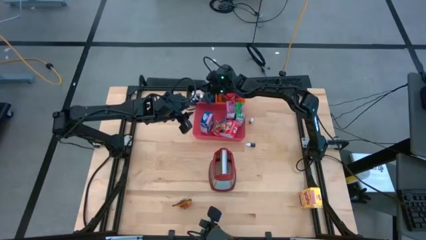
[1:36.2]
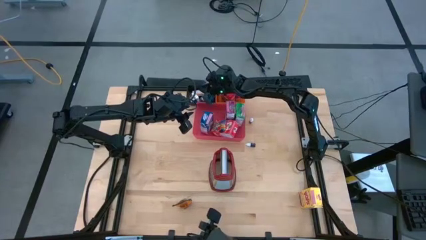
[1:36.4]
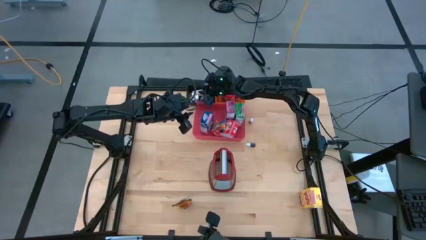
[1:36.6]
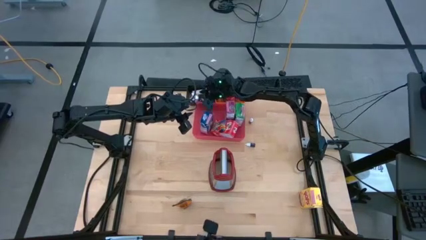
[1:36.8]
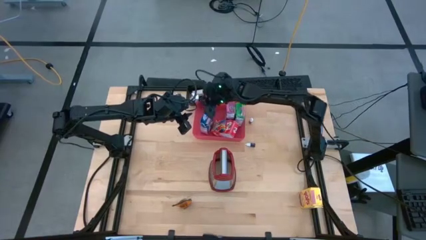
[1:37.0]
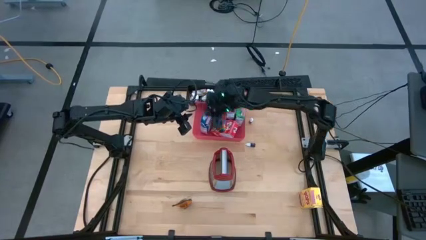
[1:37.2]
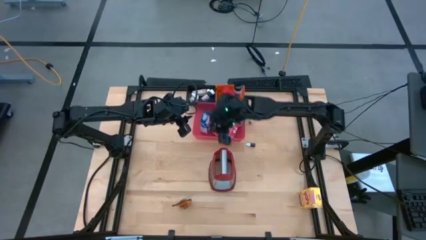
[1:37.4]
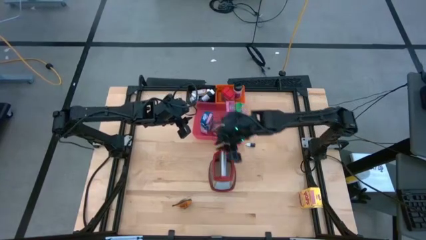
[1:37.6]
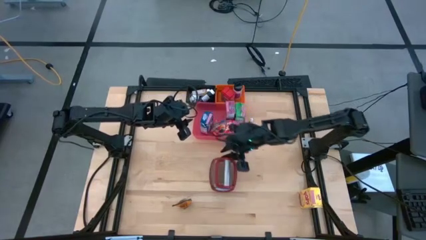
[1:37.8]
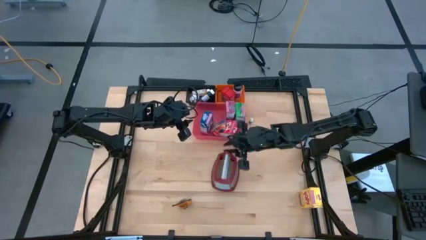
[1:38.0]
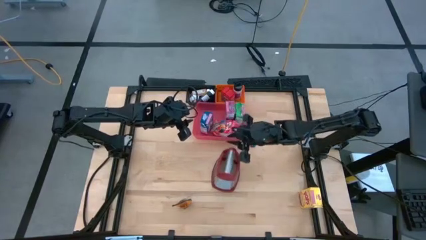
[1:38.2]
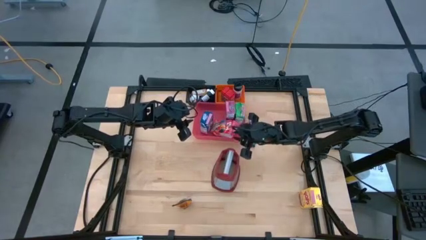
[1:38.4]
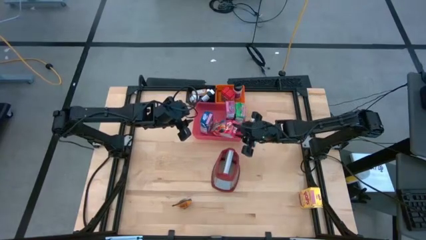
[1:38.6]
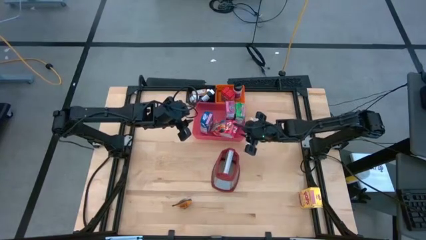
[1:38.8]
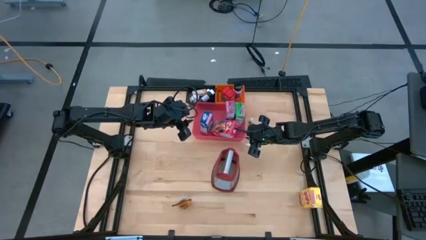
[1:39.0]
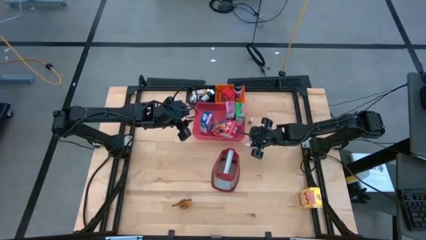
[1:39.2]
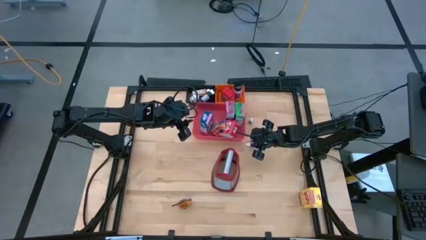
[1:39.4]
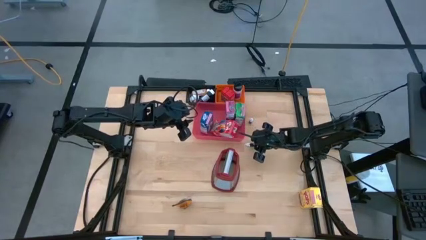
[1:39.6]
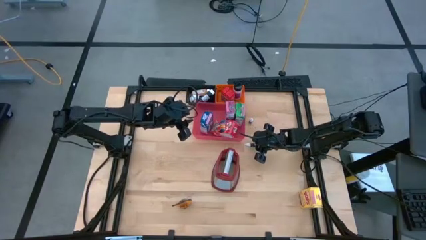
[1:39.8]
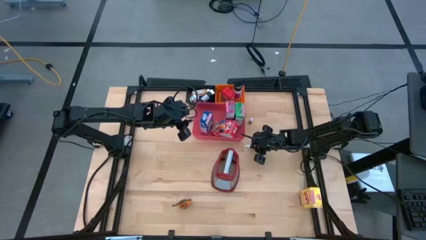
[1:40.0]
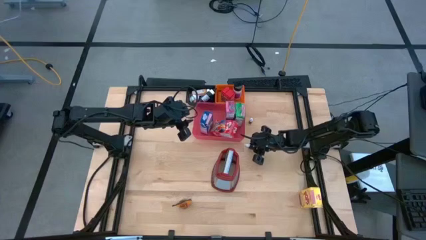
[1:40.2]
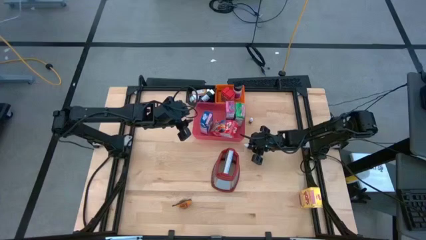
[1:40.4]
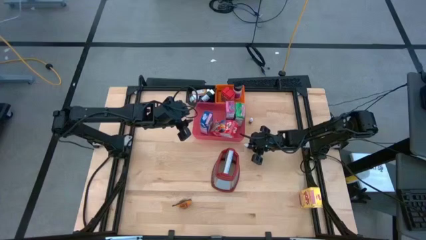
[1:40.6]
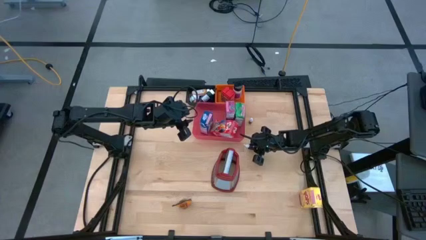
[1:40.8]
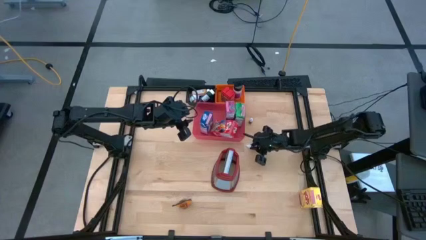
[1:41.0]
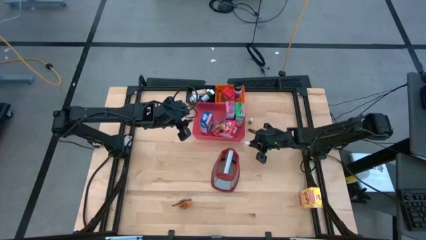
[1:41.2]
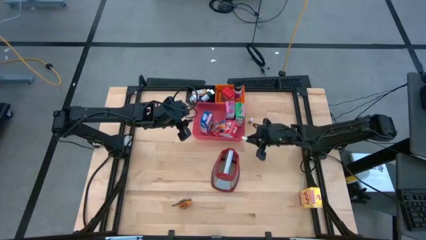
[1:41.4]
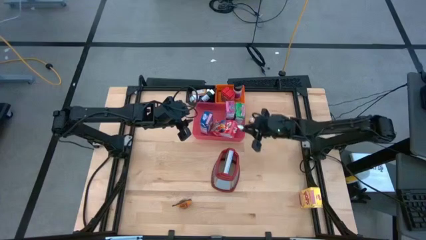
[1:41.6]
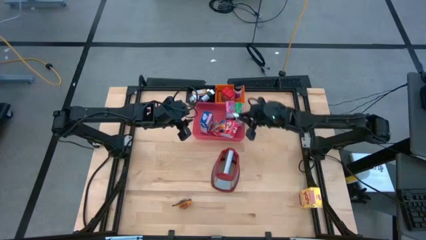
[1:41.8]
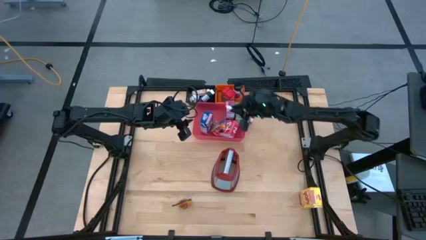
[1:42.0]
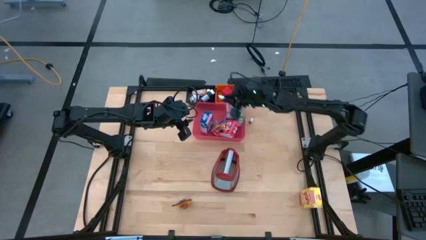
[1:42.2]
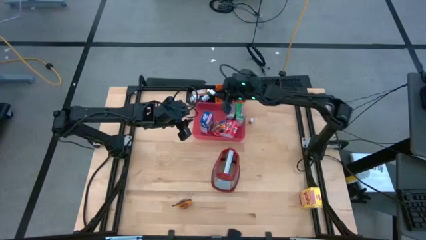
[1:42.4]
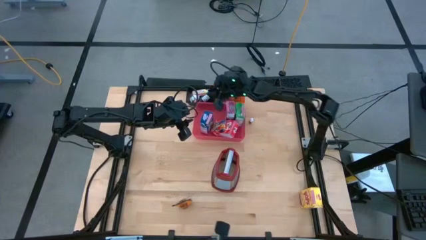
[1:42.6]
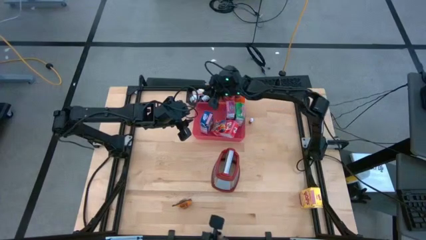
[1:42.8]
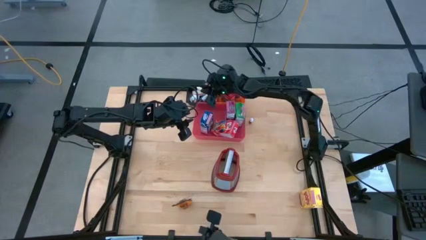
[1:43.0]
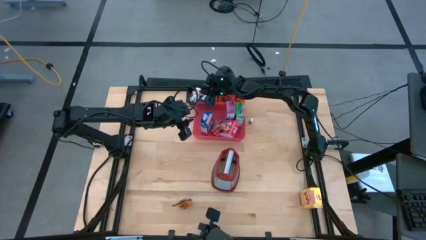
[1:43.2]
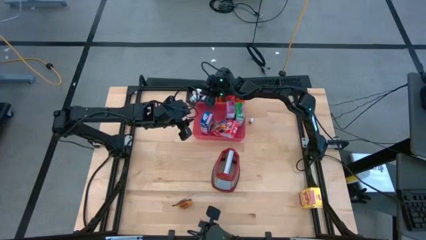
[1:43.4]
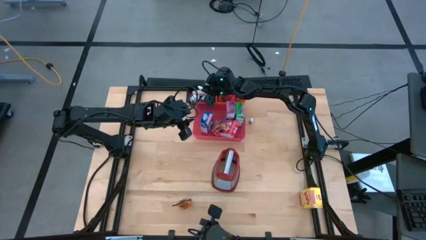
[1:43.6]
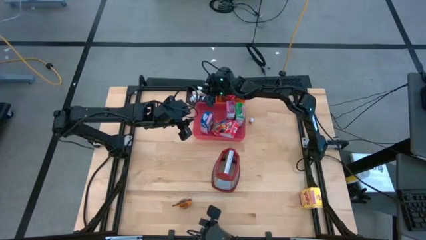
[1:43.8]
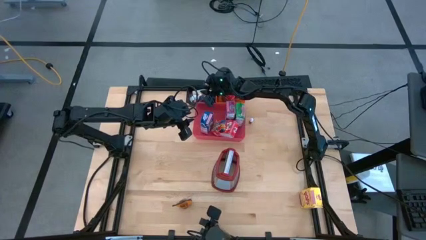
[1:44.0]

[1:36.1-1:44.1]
Task: Pick & Place Kitchen Items
Put the small purple food coloring bottle into black basket

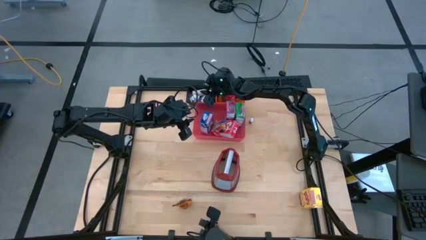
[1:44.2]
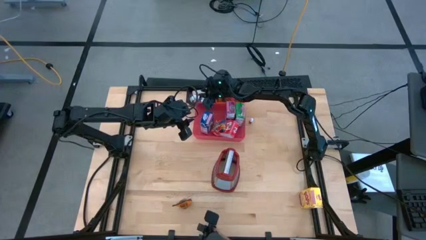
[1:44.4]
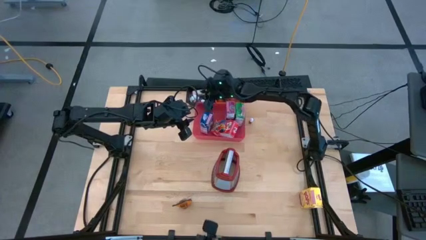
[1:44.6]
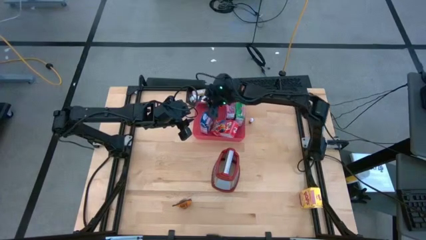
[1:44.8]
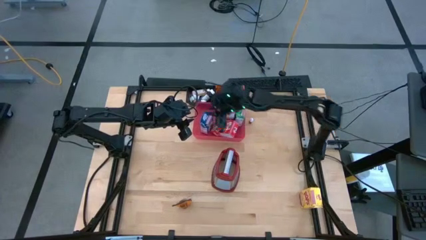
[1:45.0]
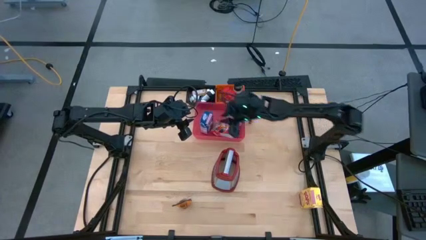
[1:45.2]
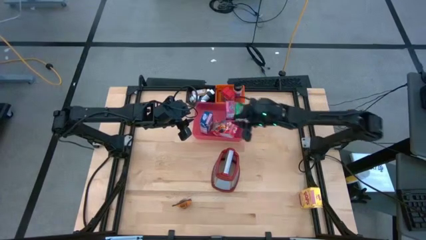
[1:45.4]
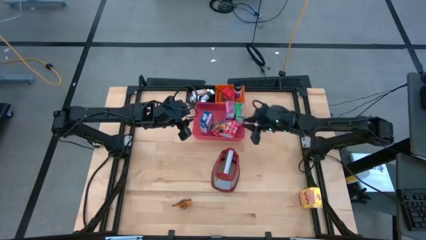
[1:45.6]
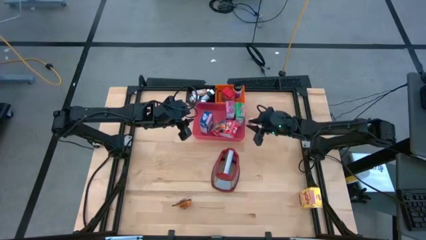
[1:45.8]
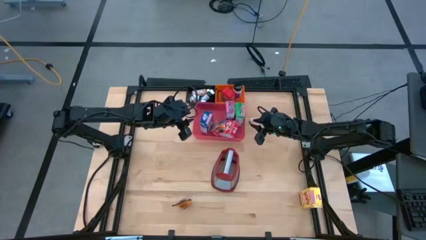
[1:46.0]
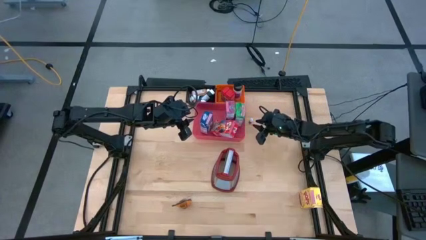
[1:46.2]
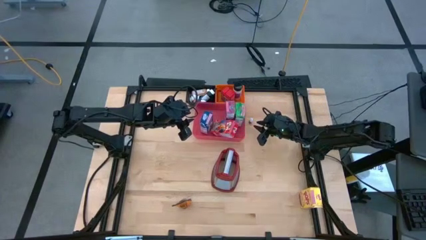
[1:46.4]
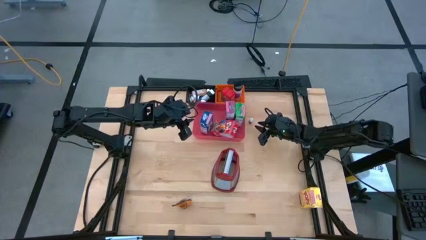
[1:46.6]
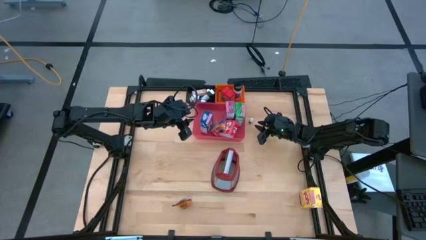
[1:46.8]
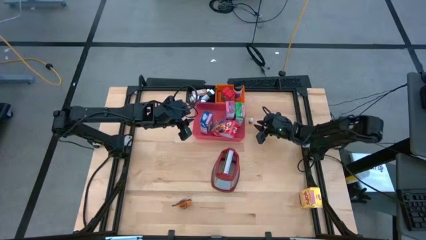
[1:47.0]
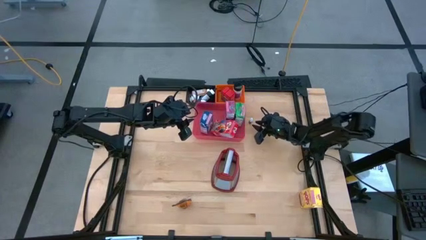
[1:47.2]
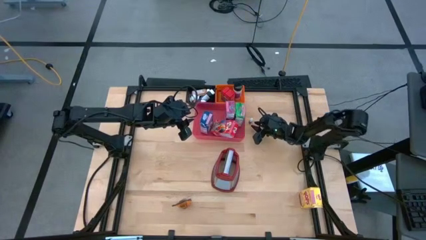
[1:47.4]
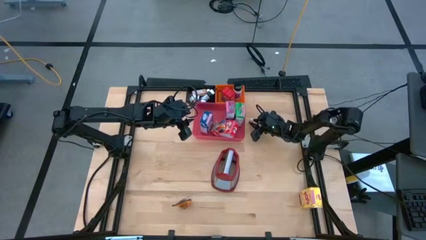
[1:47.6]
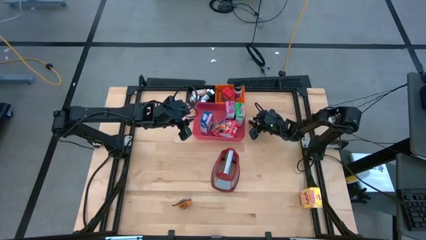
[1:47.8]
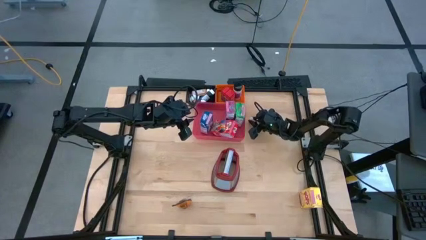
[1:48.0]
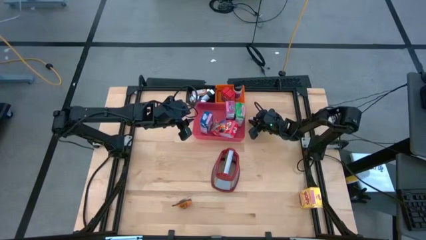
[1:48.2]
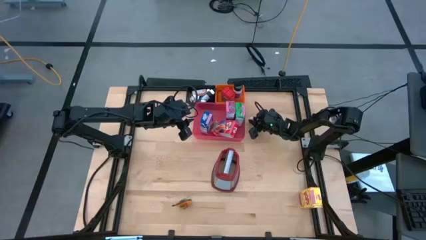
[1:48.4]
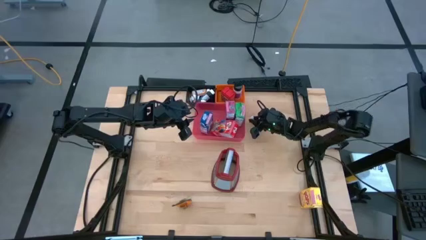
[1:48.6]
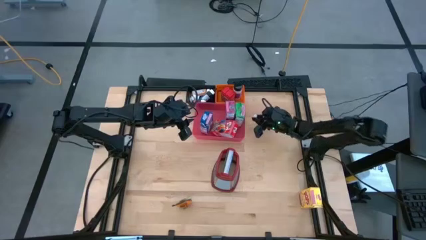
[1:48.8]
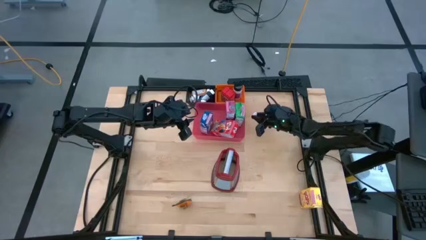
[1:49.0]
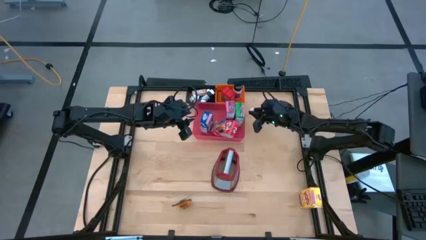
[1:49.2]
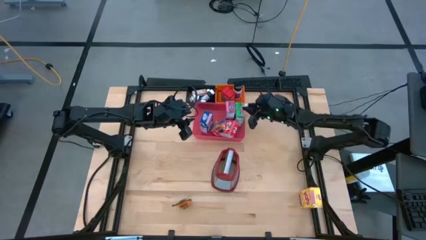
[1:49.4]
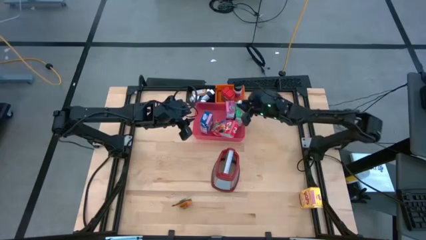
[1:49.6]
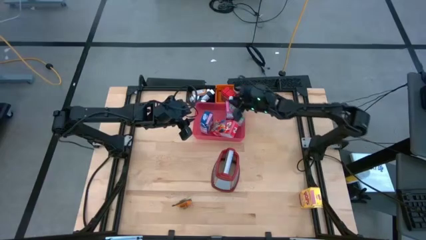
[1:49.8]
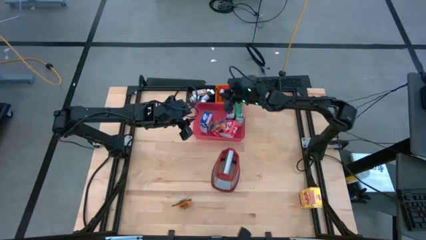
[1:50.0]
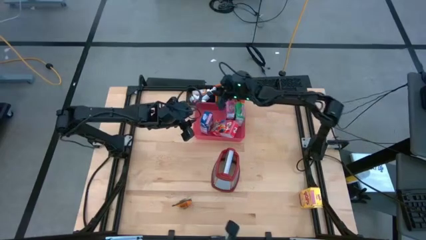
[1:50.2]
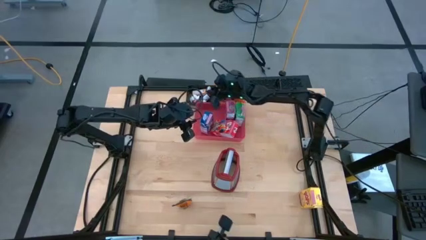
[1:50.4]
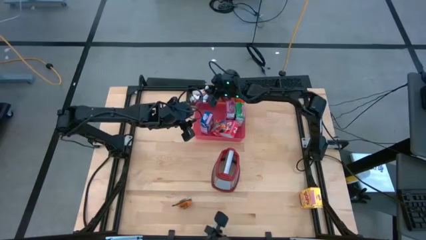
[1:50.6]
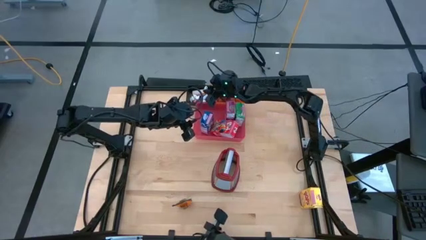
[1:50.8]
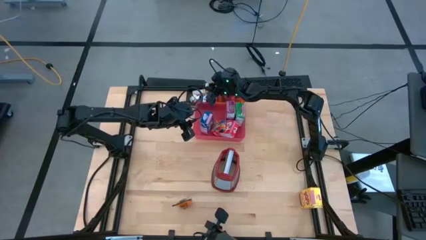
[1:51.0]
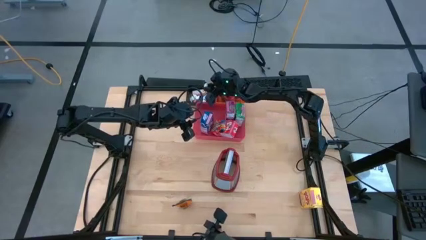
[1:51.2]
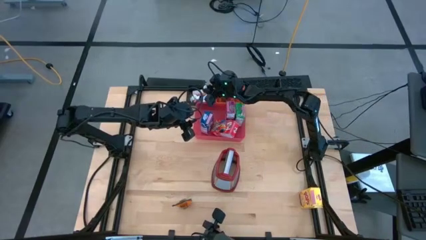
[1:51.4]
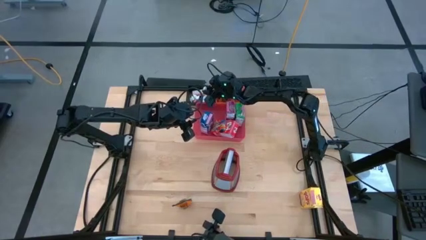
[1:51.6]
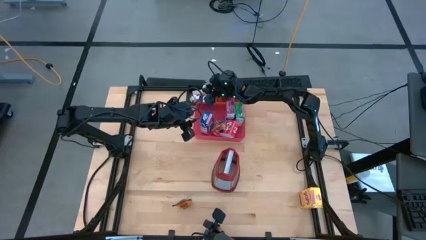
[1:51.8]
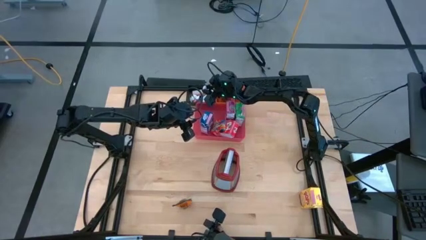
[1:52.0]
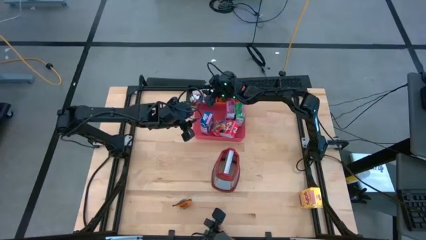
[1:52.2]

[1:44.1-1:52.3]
Put the small red food coloring bottle into black basket
